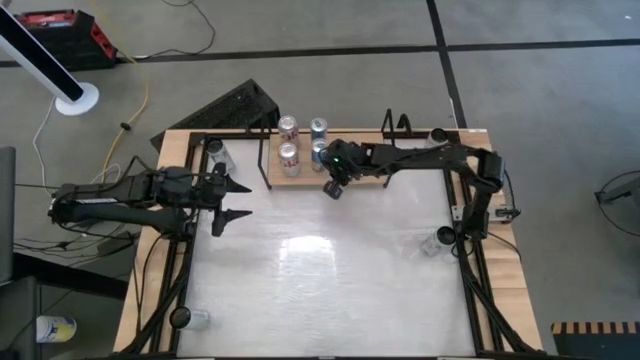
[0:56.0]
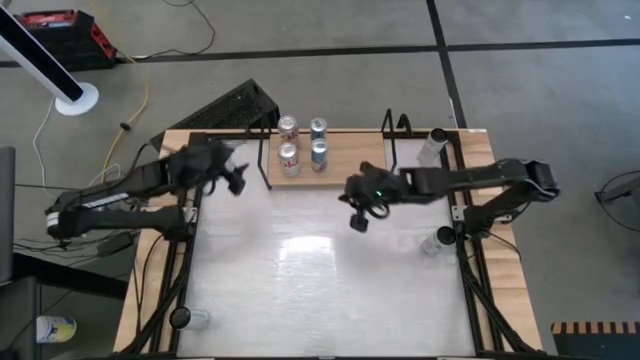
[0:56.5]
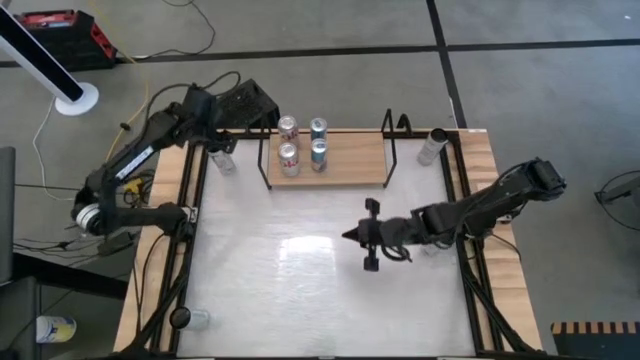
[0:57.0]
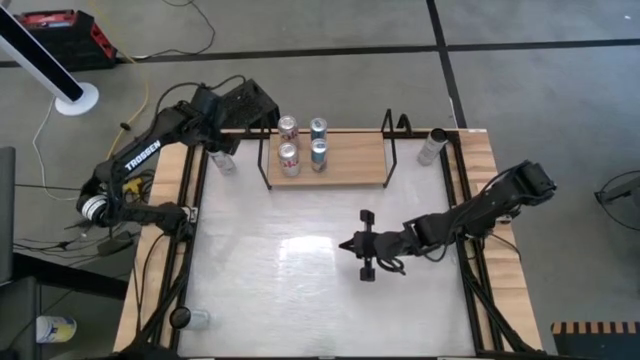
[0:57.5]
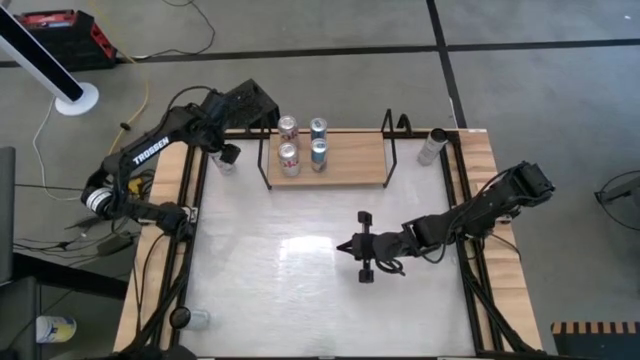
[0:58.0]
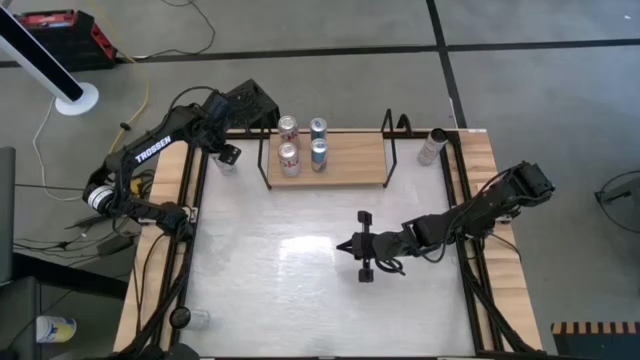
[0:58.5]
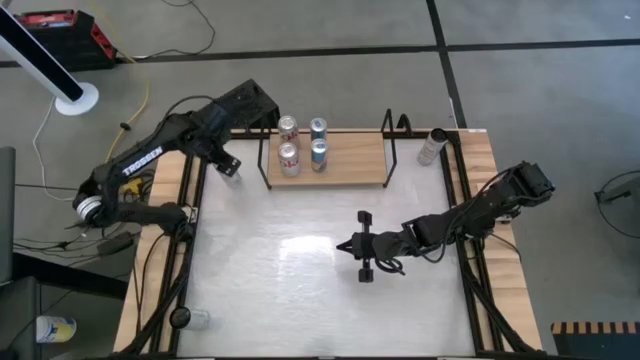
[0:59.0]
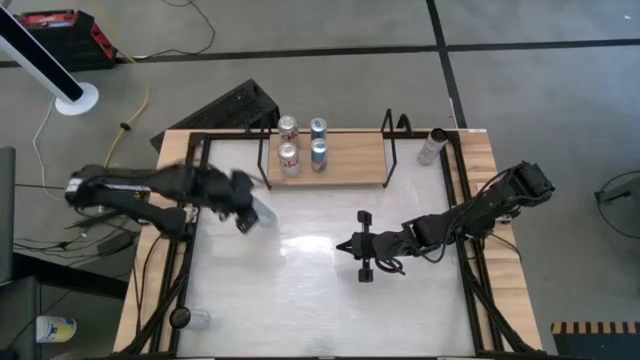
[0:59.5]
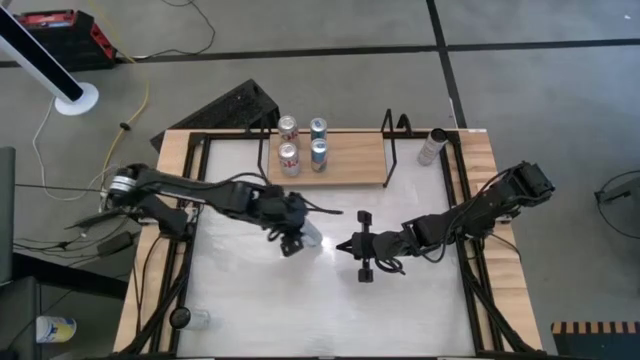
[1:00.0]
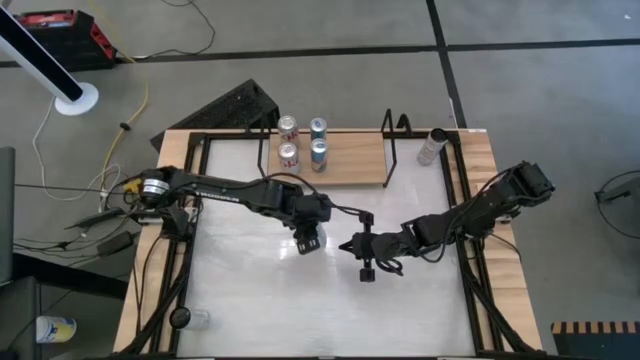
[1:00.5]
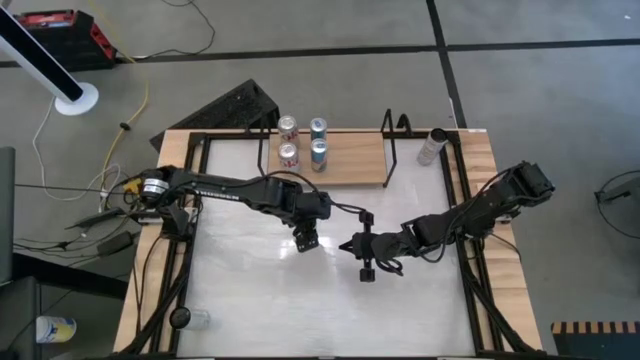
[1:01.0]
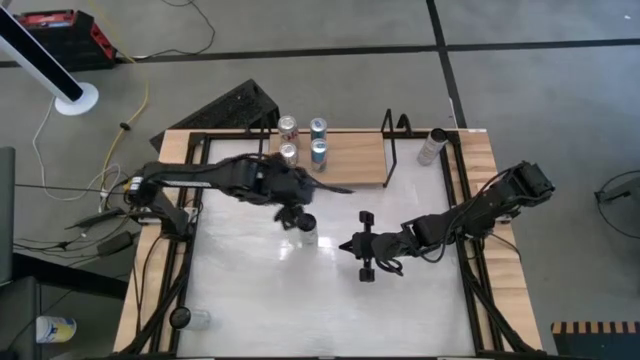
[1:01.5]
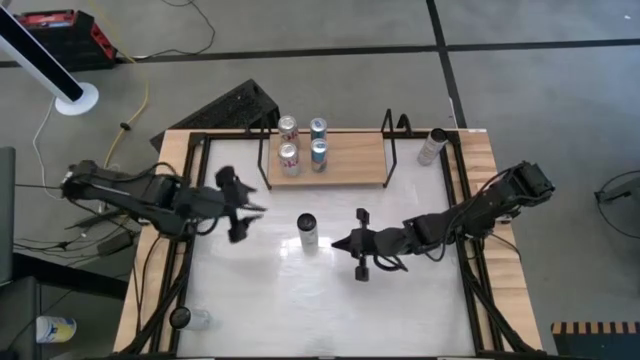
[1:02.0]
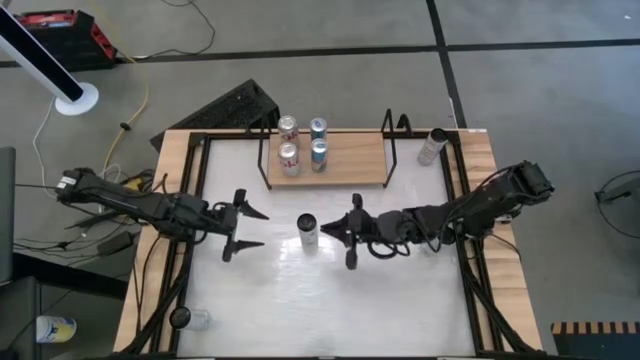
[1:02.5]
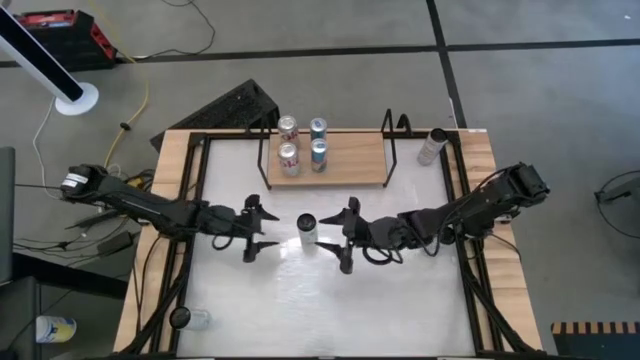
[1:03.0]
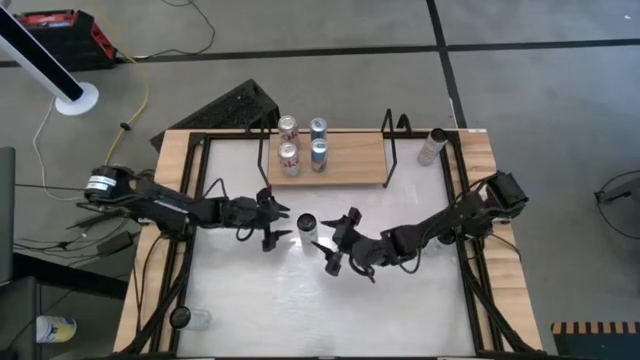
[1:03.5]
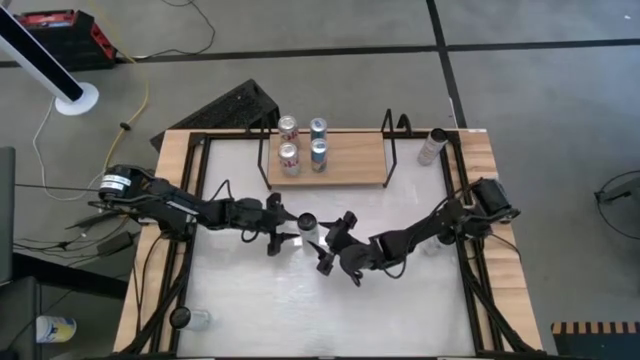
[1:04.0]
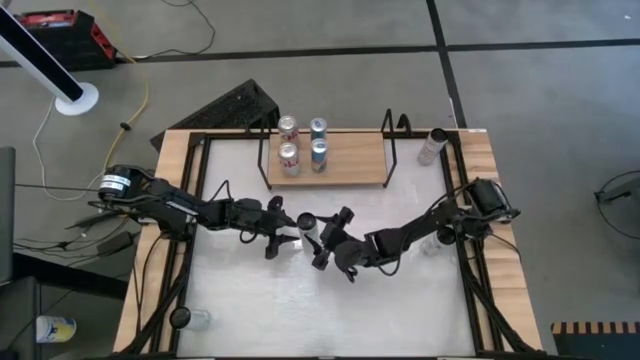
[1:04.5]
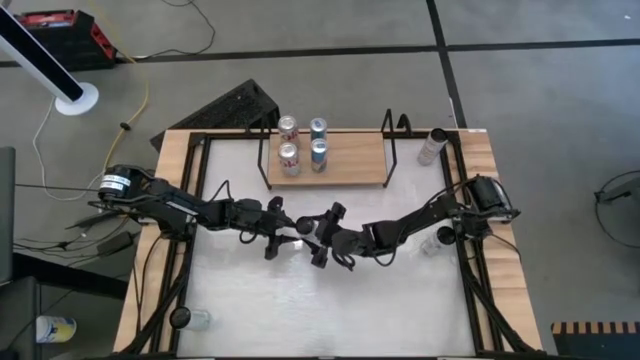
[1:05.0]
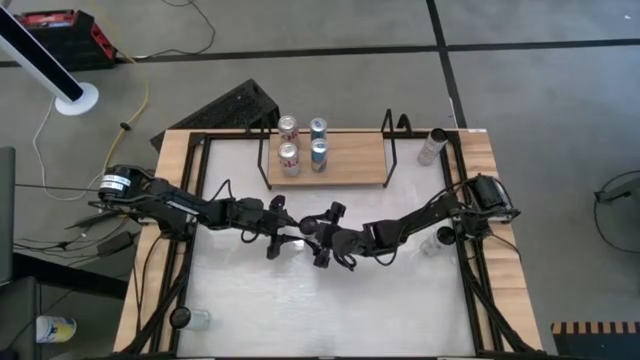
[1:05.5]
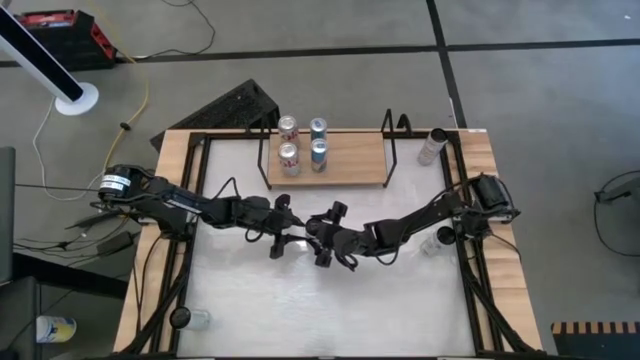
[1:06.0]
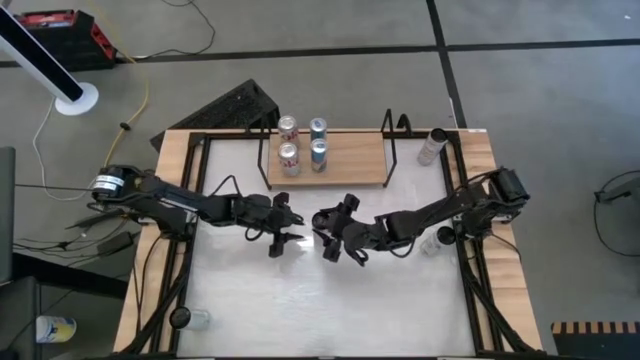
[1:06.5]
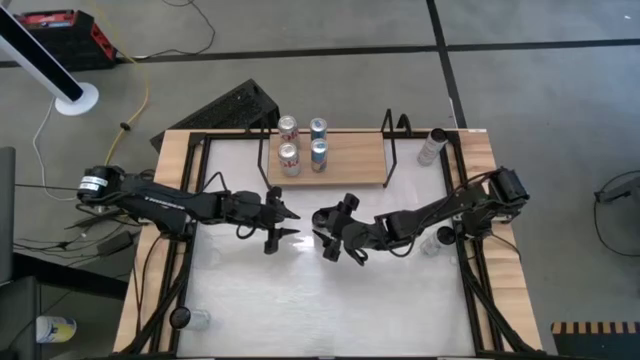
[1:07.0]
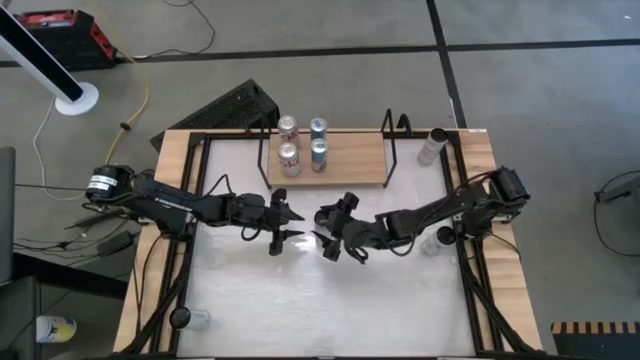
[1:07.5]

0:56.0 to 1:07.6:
Task: Place canned beverage on shelf
Put the left white pink soda can on the shelf

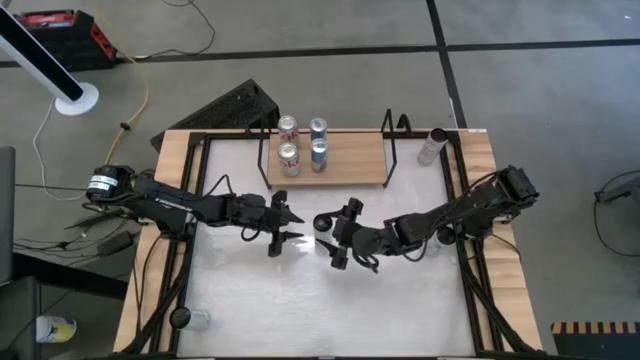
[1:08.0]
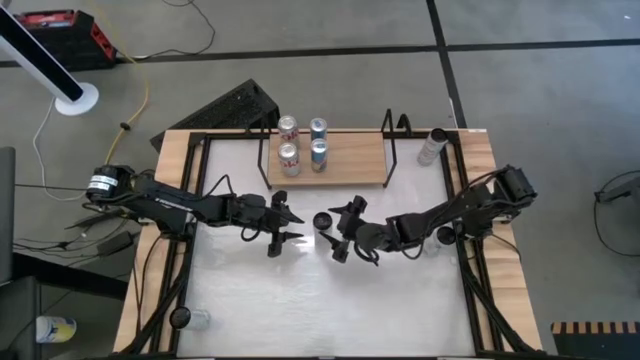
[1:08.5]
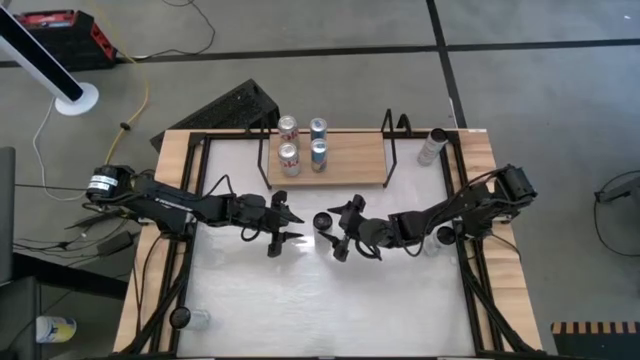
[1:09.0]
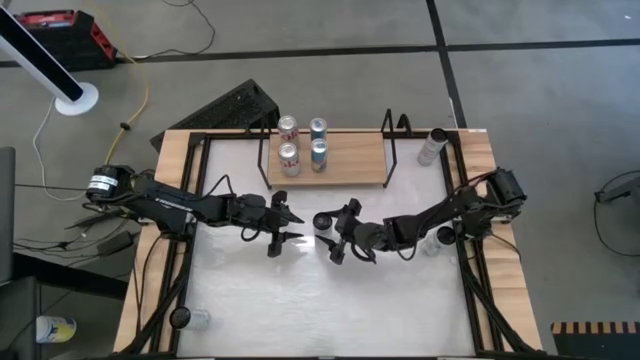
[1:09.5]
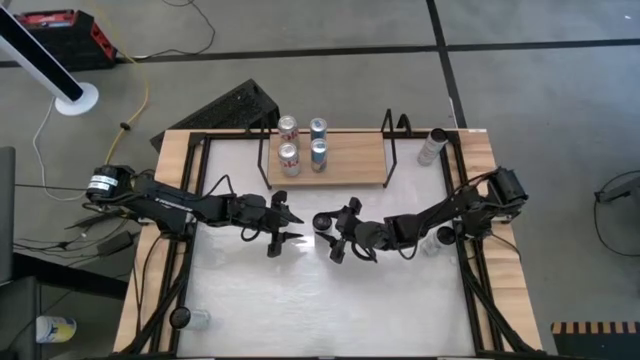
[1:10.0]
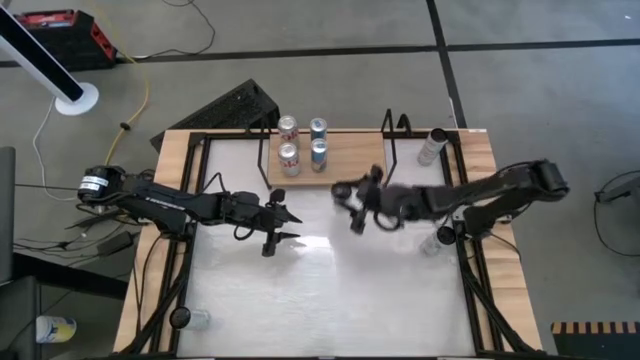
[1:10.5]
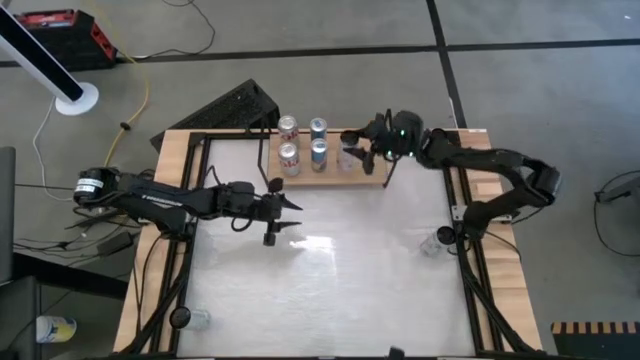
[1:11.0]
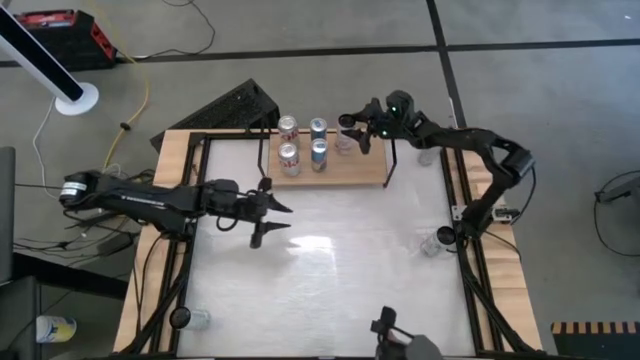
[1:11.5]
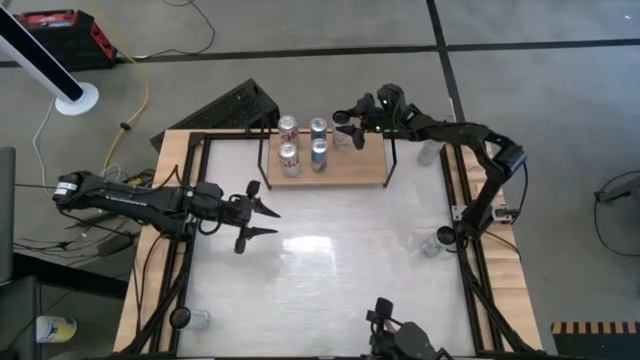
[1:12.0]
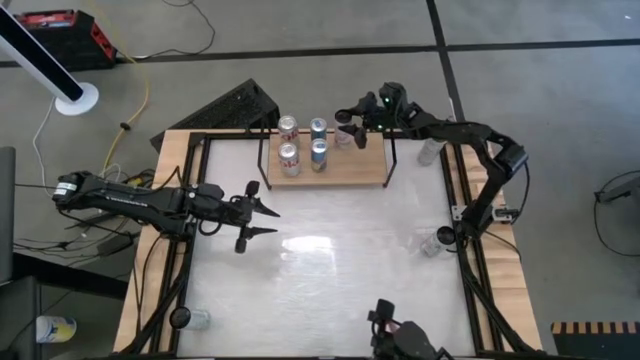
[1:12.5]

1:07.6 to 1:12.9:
Put the left white pink soda can on the shelf

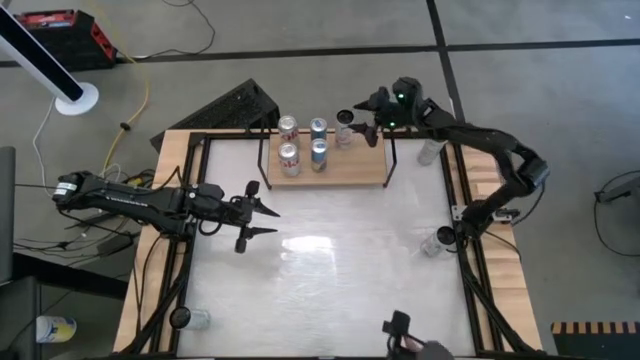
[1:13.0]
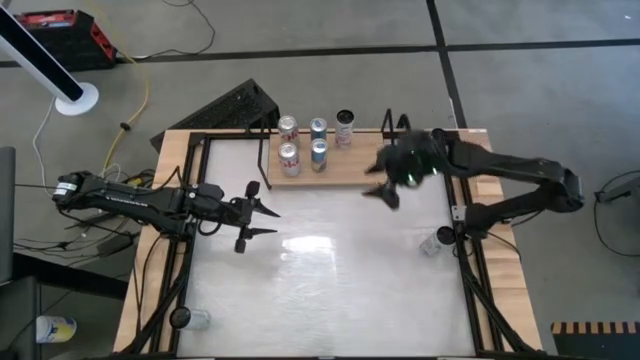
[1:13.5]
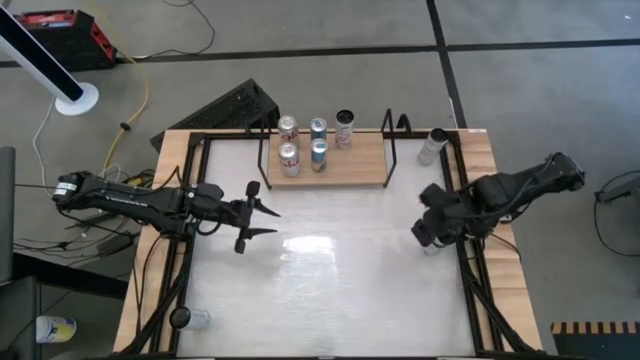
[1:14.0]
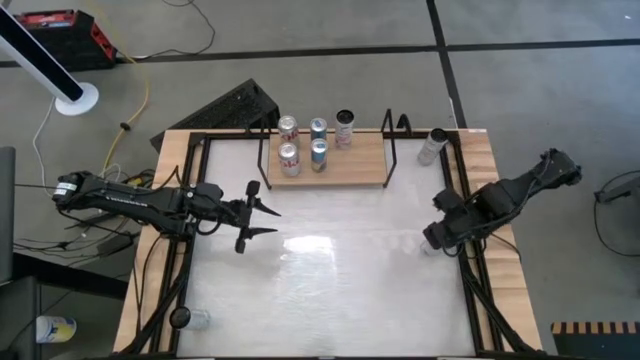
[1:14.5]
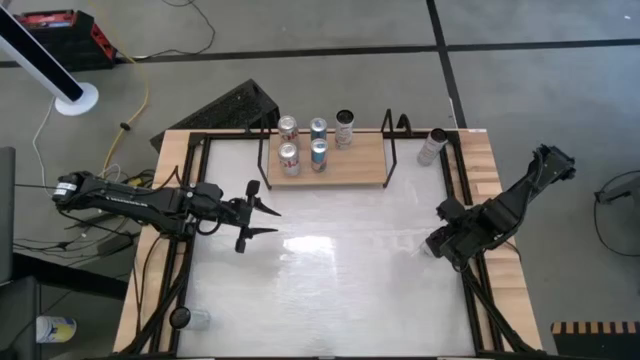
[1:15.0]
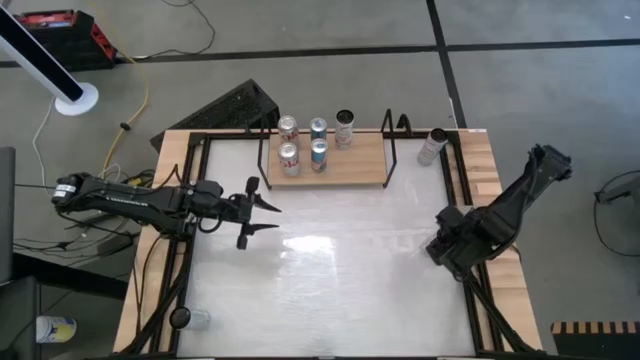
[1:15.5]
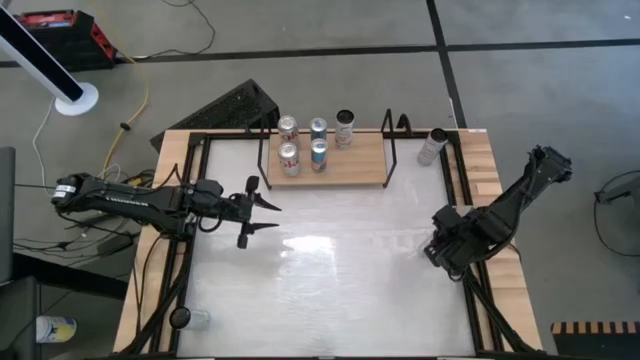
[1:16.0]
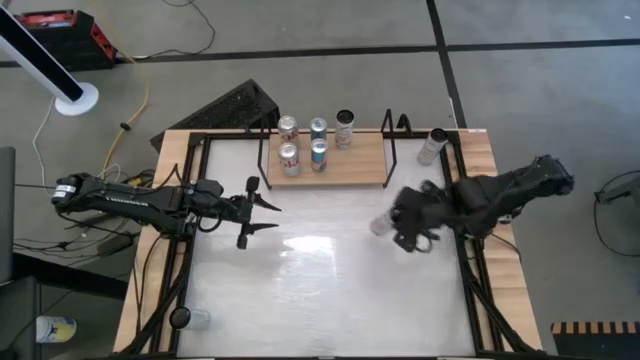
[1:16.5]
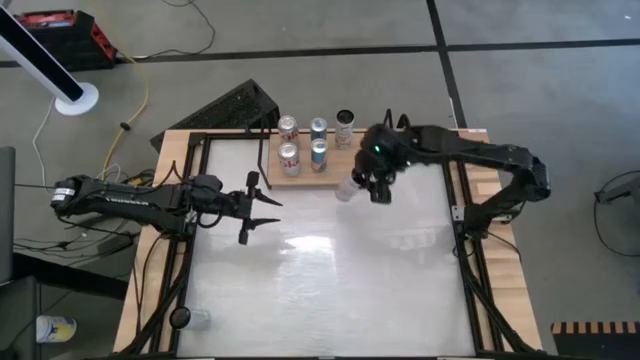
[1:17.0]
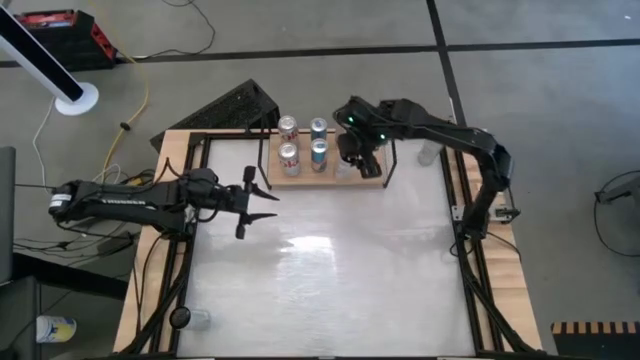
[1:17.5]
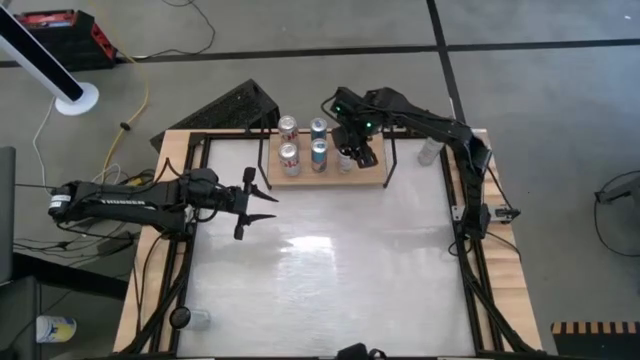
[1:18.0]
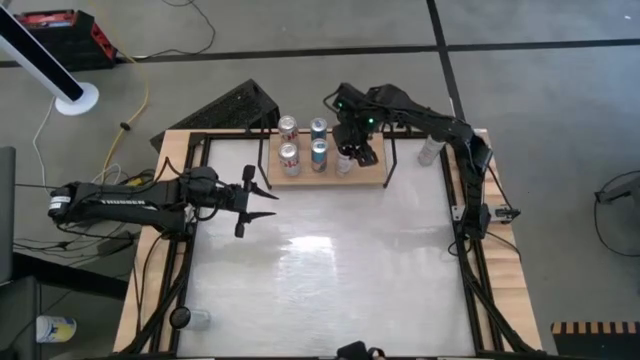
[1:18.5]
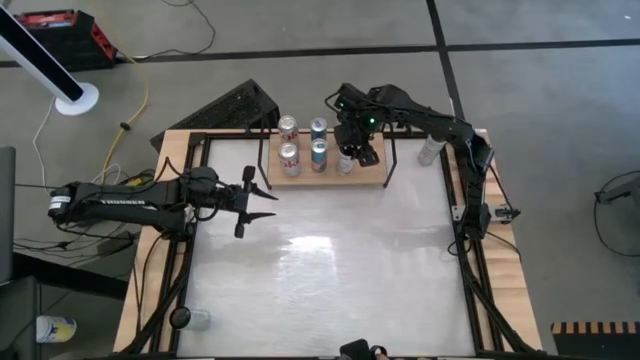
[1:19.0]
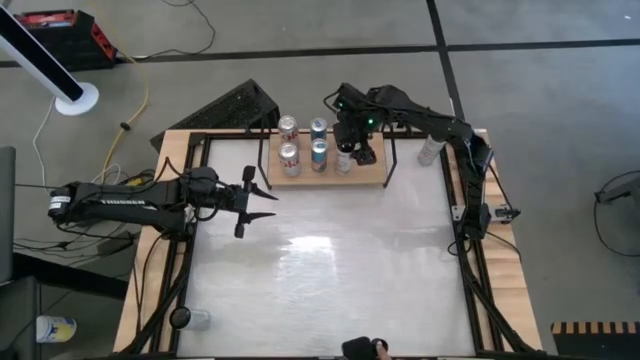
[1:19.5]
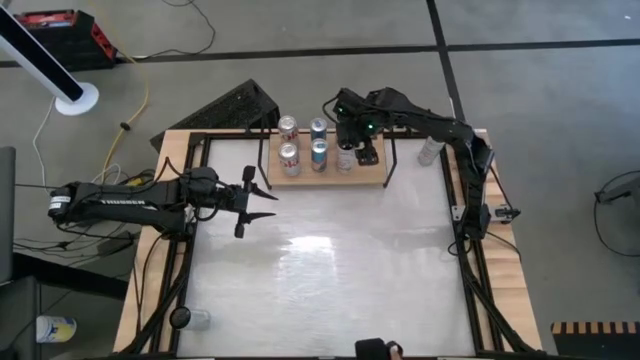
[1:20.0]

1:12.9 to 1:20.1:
Put the white pink soda can on the shelf aligned with the other white pink soda can
